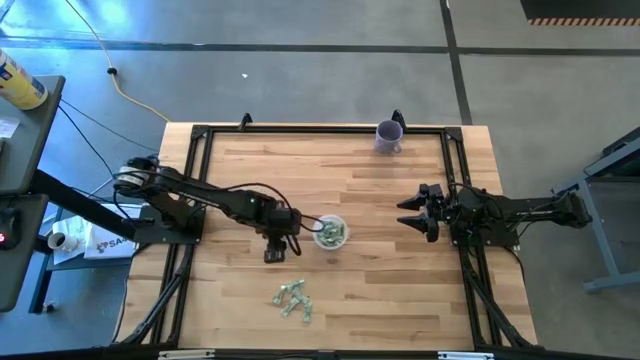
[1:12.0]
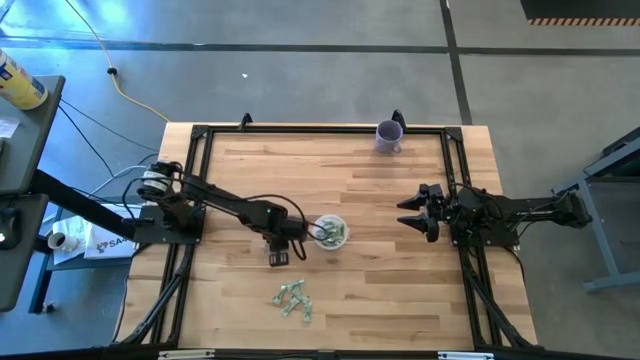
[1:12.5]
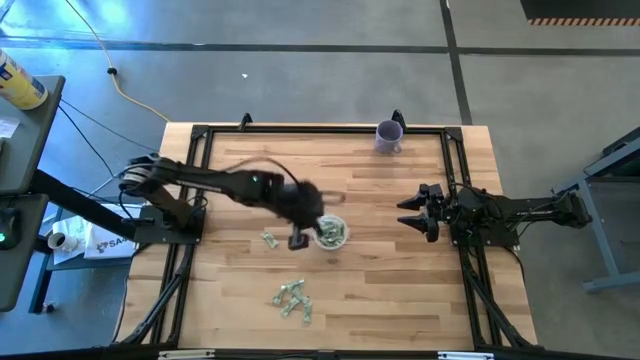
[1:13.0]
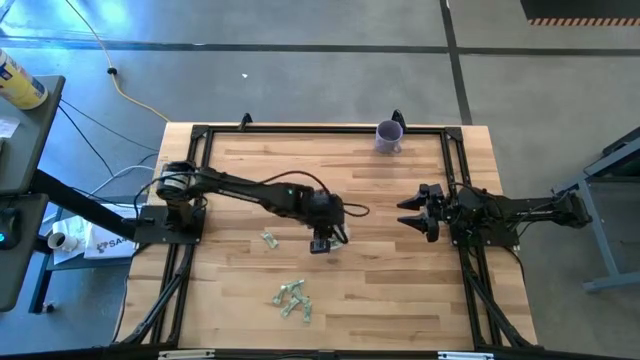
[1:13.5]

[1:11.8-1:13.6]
Task: Pick and place Stevia / Truvia into bins
Put the stevia packet into the bin

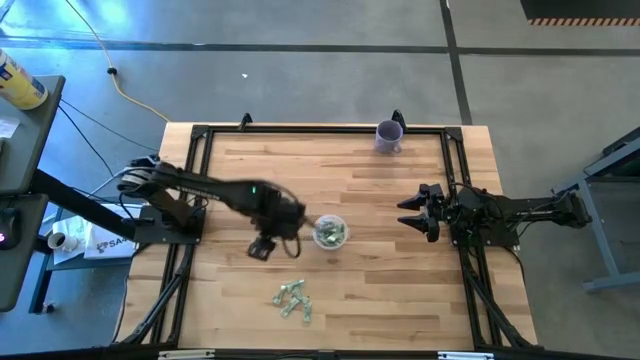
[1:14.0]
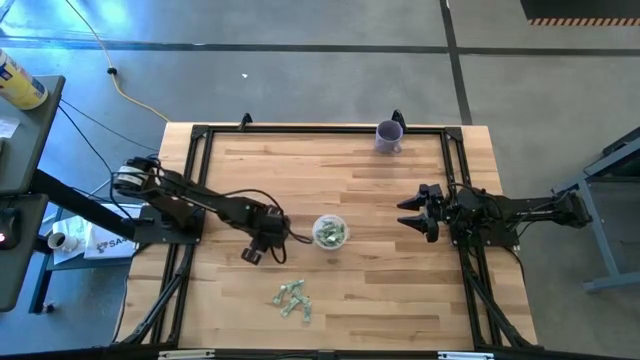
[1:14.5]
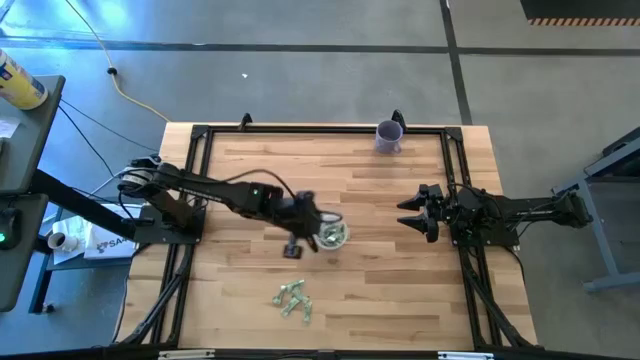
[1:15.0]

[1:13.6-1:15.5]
Put the stevia packet into the bin

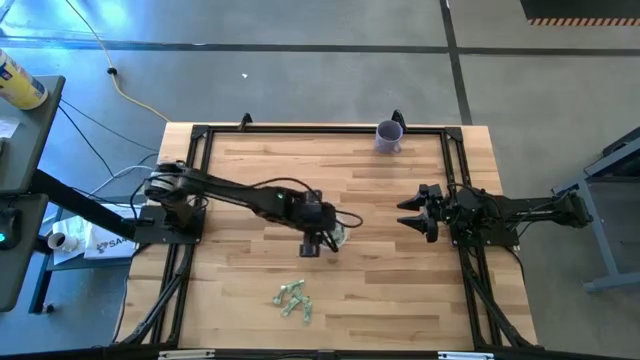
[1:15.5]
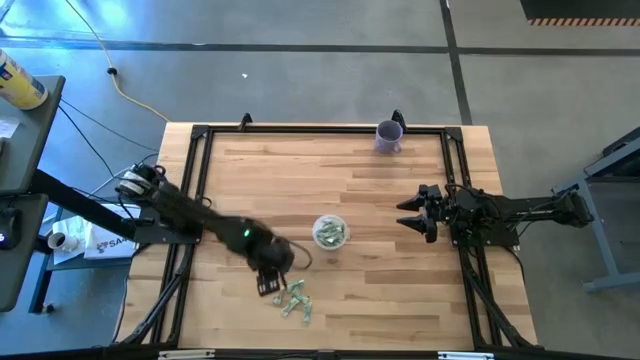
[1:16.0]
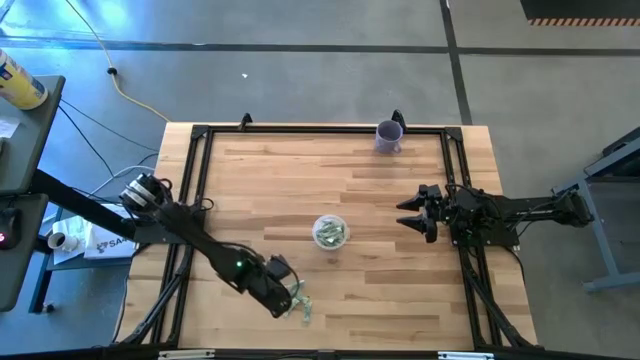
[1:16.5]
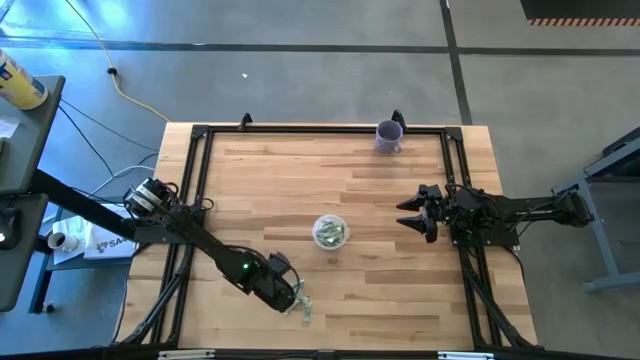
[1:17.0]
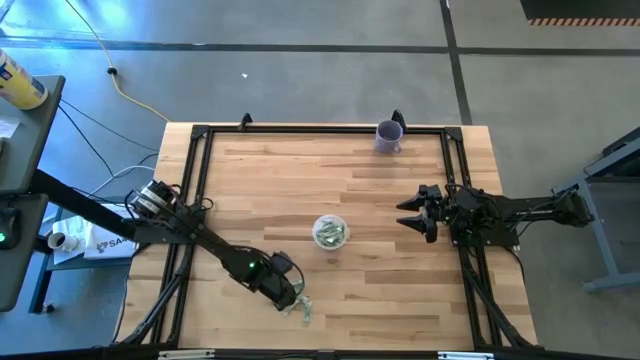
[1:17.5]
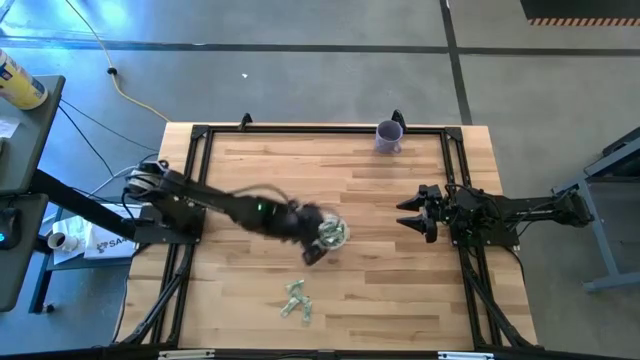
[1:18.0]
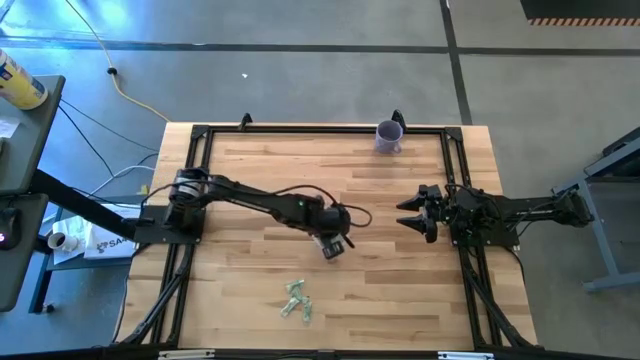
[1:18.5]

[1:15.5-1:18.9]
Put the stevia packet into the bin

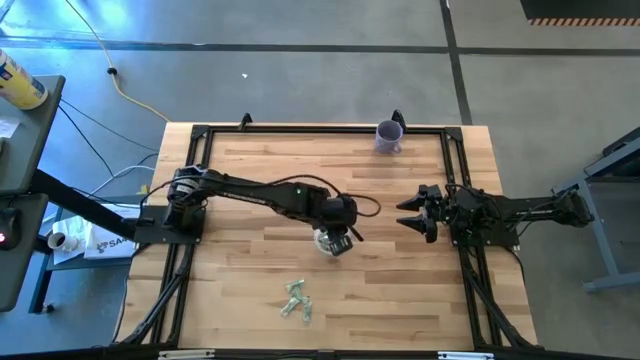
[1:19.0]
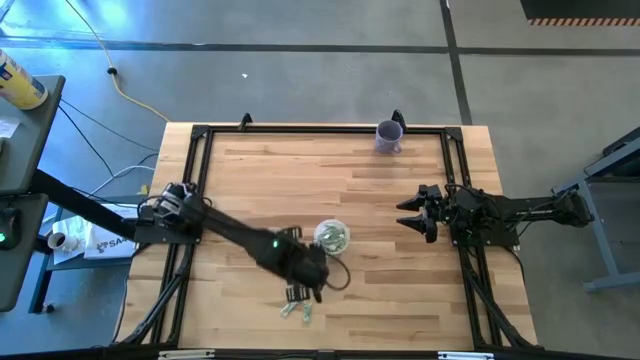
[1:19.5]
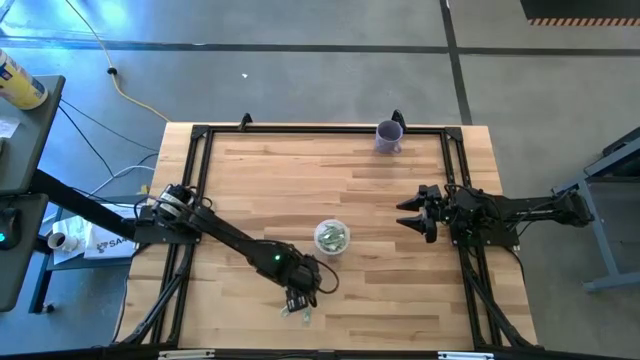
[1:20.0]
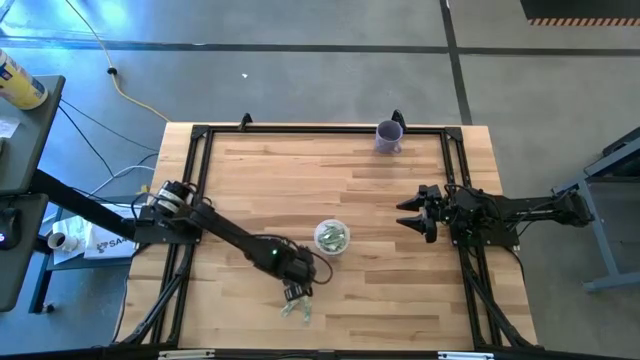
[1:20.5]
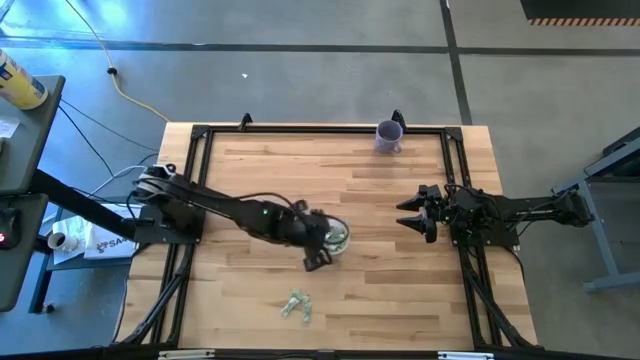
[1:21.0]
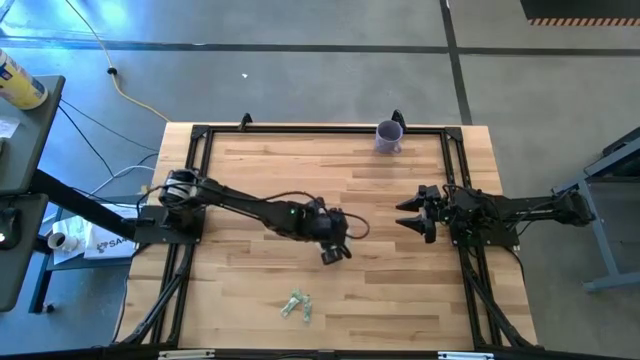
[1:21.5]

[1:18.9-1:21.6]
Put the stevia packet into the bin

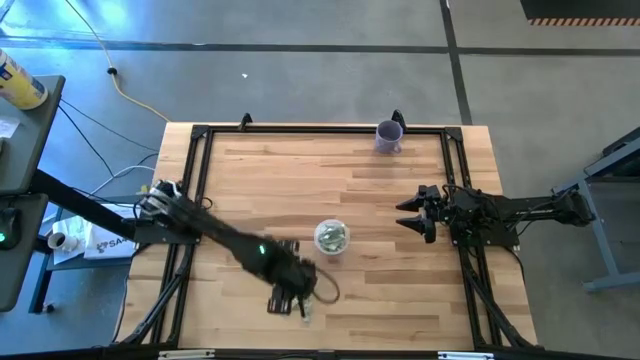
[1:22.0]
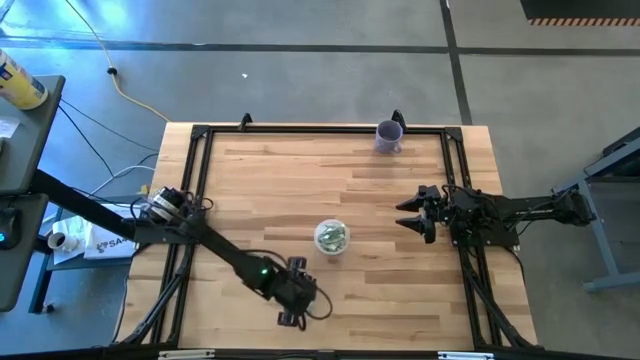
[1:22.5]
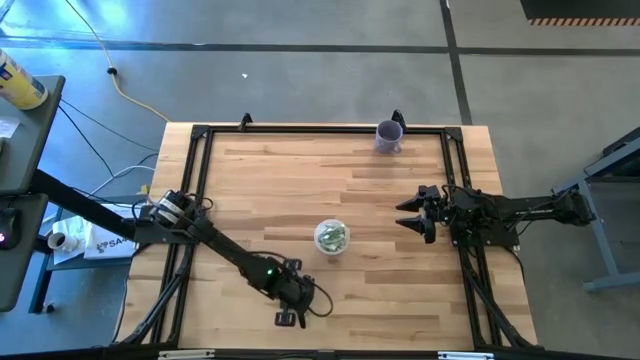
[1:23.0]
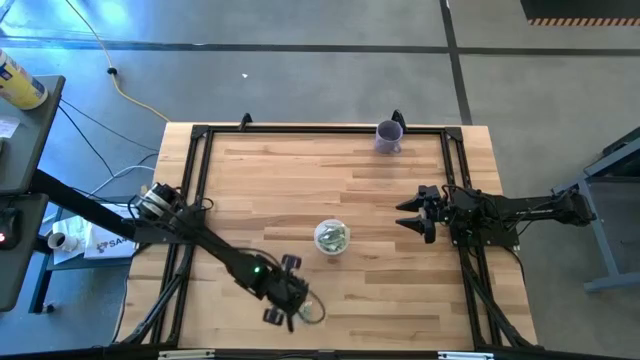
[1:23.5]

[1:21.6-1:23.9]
Put the stevia packet into the bin

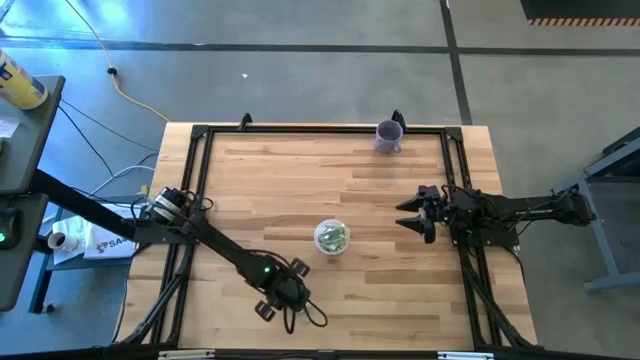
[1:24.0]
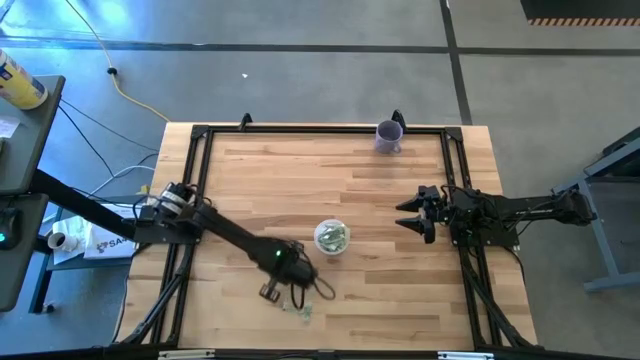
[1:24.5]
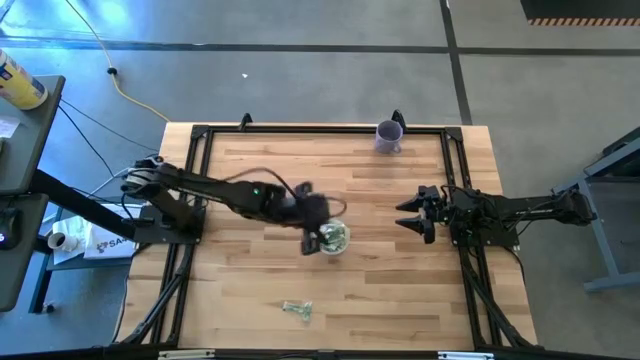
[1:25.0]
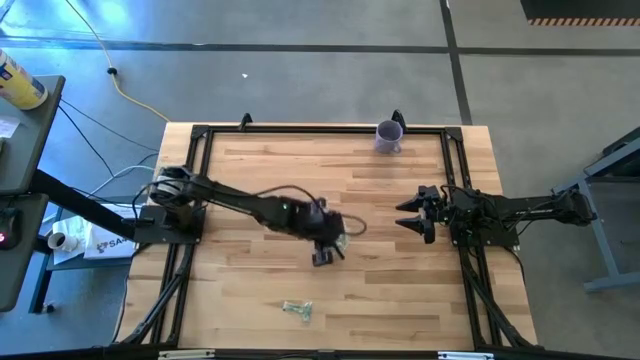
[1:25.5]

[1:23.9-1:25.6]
Put the stevia packet into the bin

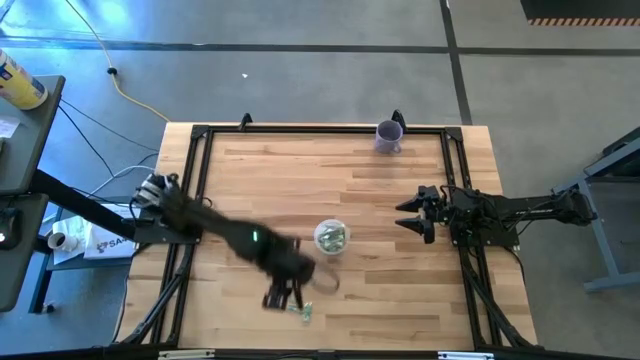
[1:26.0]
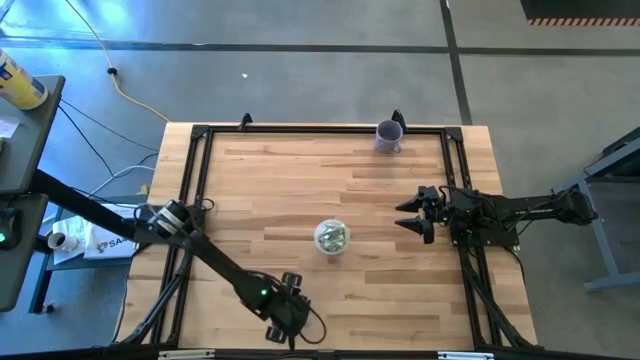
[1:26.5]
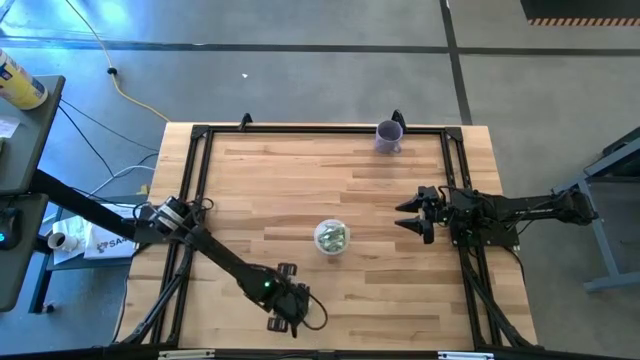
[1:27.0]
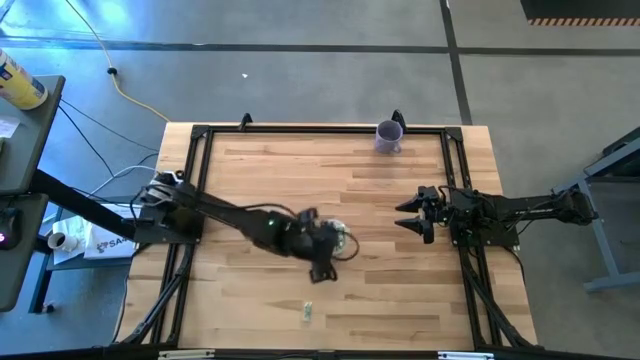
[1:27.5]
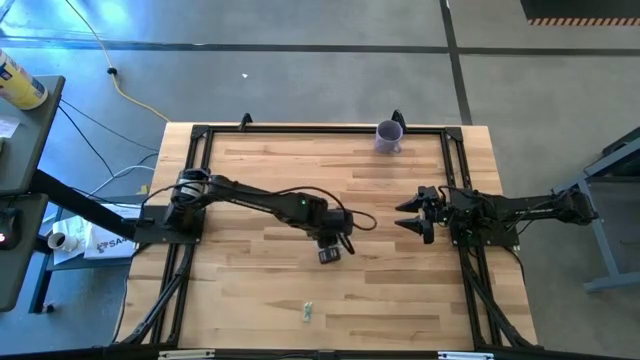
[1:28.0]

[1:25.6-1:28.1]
Put the stevia packet into the bin

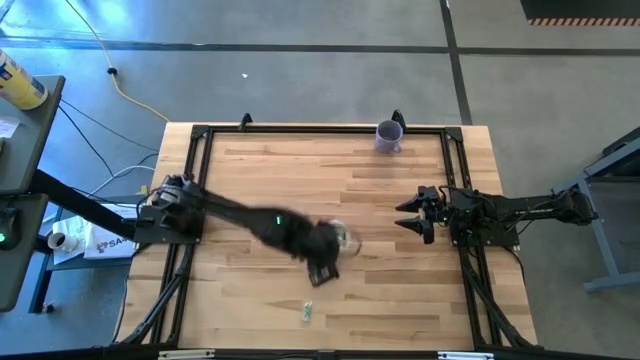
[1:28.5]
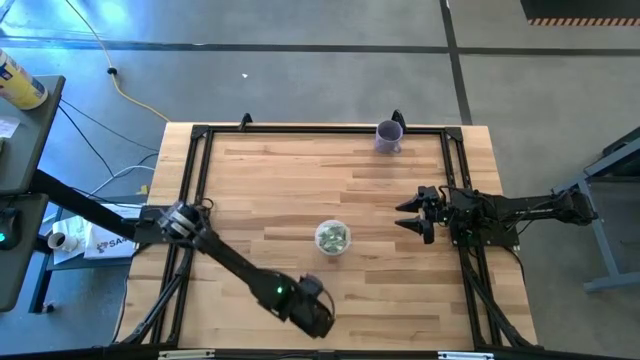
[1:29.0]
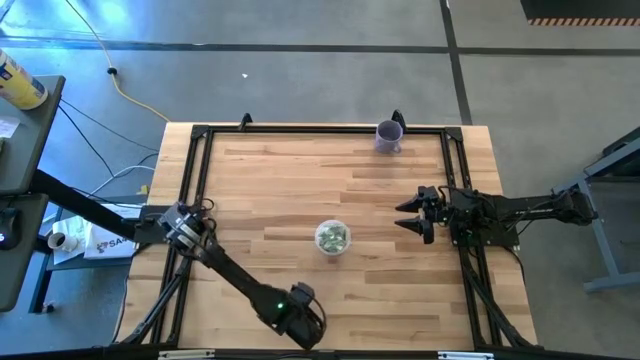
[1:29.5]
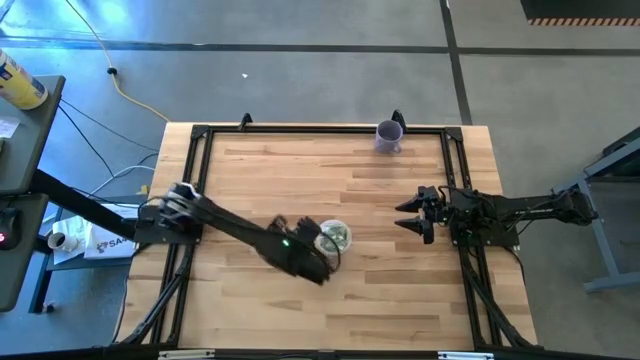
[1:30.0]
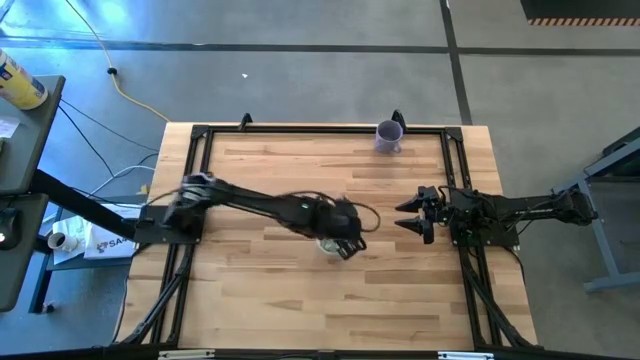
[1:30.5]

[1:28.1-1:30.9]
Put the stevia packet into the bin

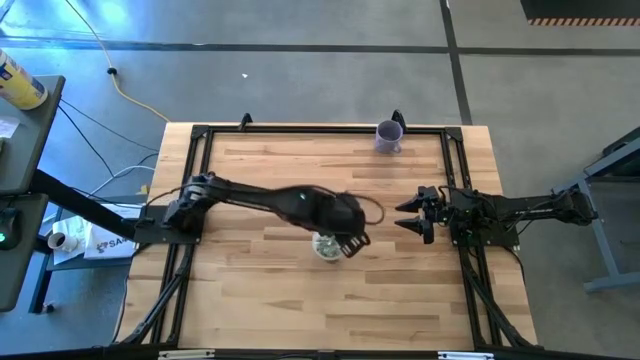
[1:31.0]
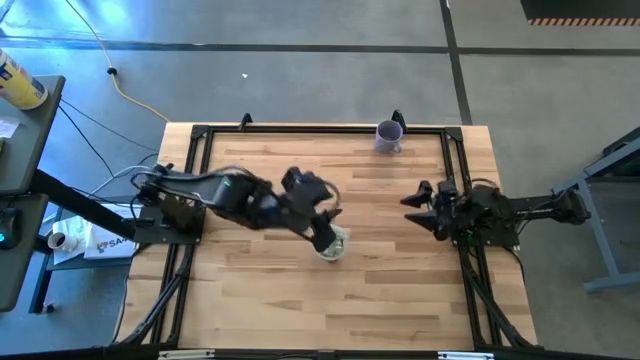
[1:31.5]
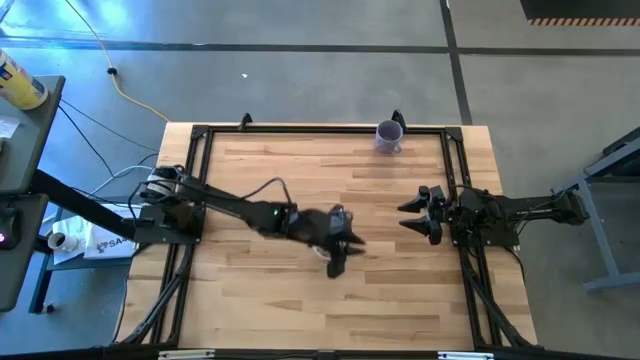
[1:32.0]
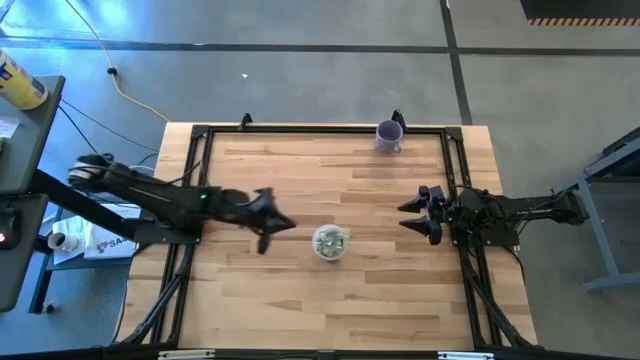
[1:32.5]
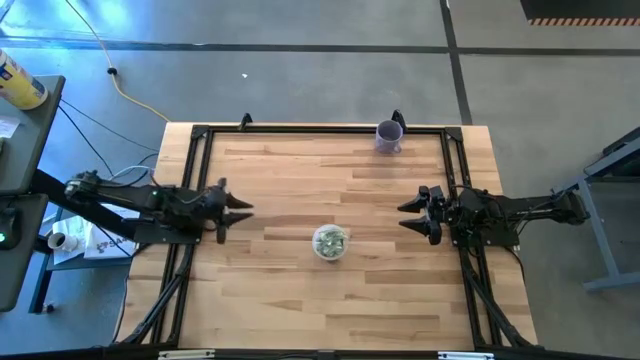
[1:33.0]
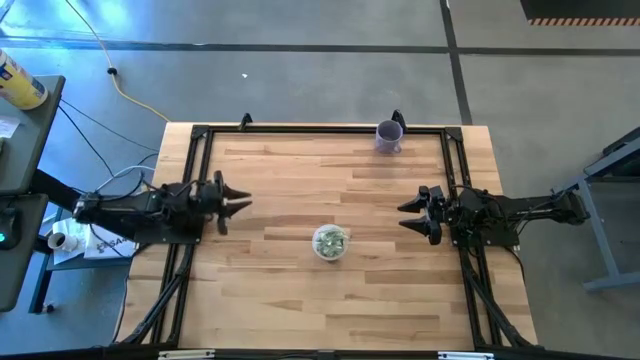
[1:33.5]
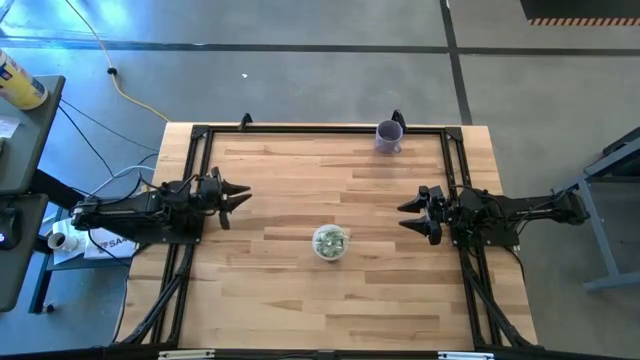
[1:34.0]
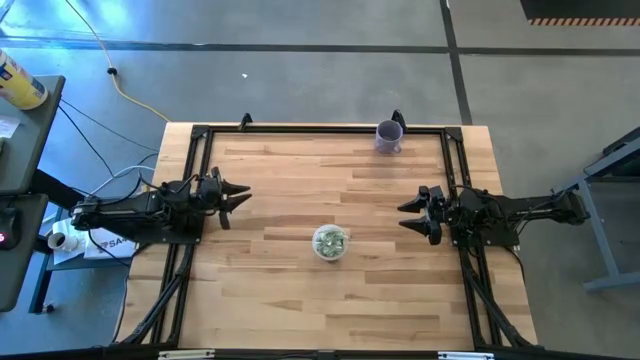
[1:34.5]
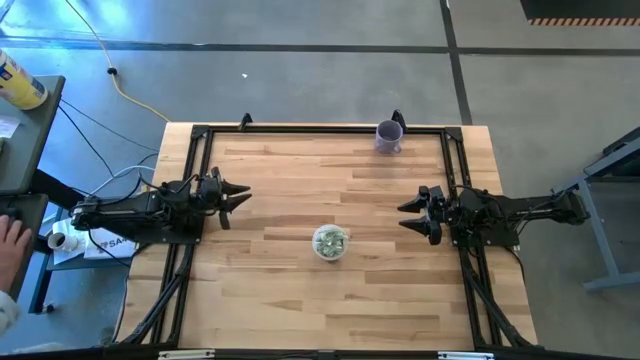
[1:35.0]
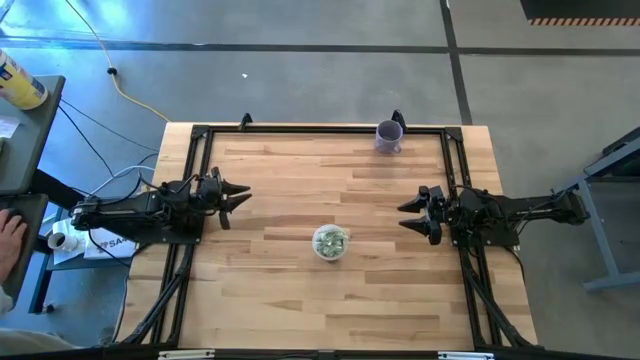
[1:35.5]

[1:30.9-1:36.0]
Return to Home Position
